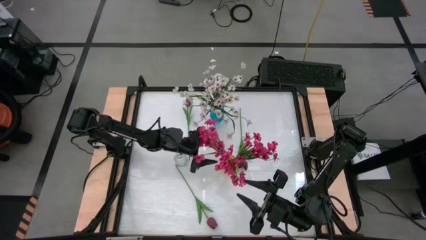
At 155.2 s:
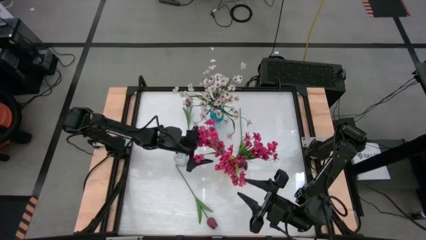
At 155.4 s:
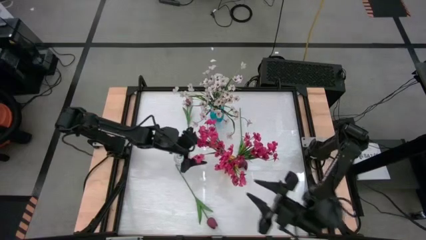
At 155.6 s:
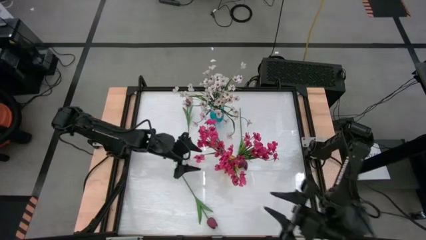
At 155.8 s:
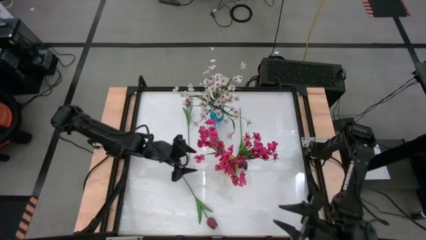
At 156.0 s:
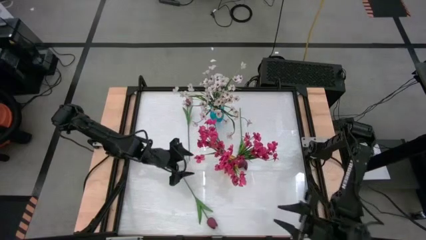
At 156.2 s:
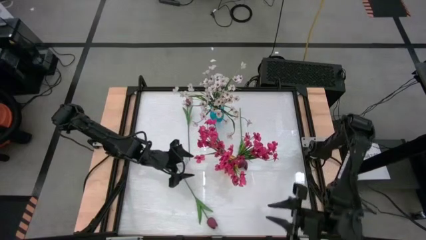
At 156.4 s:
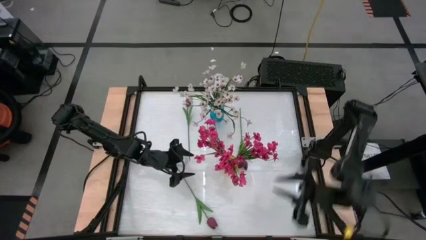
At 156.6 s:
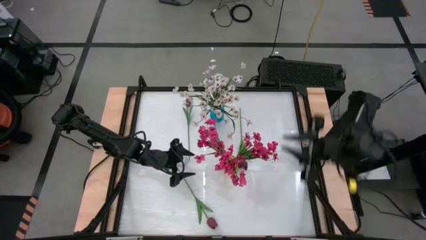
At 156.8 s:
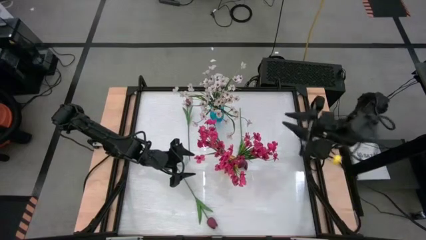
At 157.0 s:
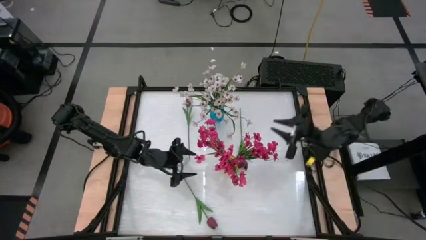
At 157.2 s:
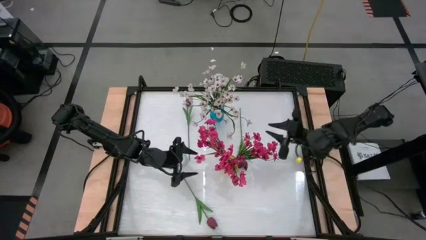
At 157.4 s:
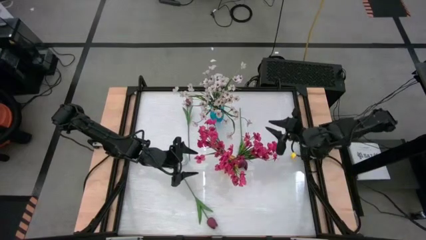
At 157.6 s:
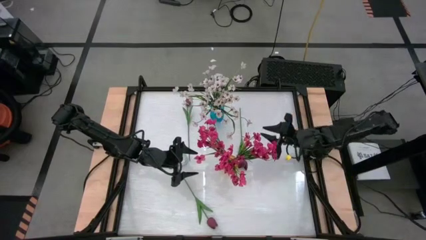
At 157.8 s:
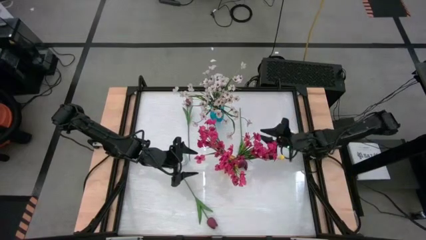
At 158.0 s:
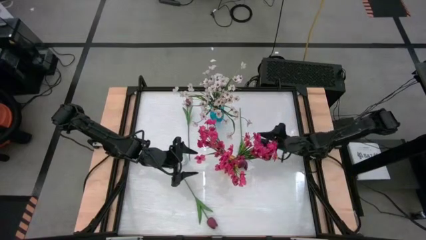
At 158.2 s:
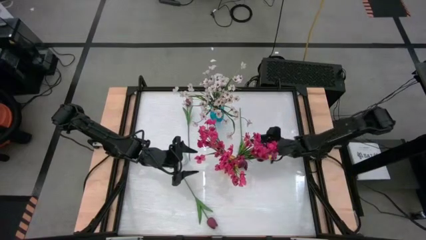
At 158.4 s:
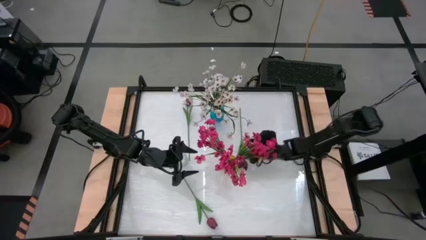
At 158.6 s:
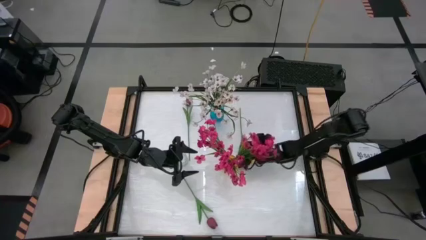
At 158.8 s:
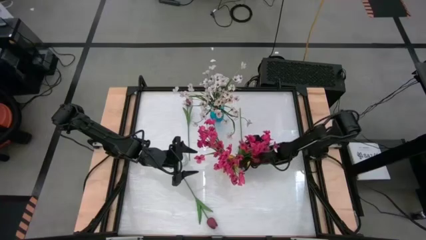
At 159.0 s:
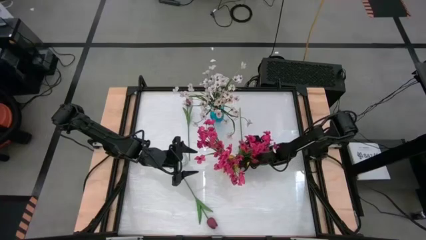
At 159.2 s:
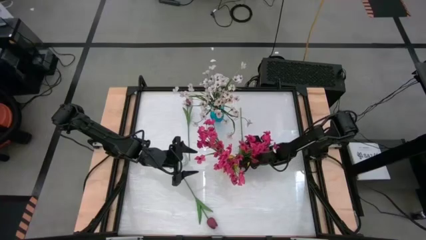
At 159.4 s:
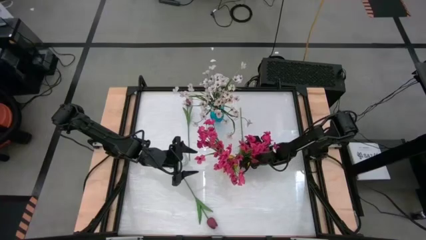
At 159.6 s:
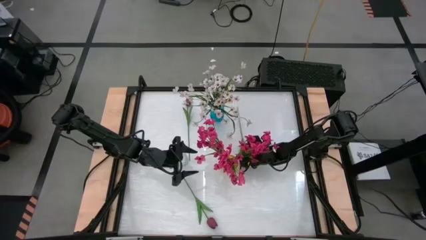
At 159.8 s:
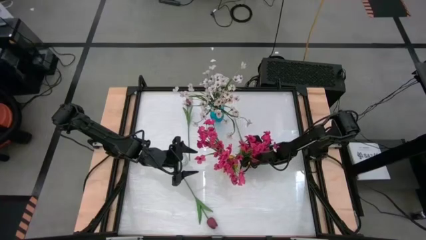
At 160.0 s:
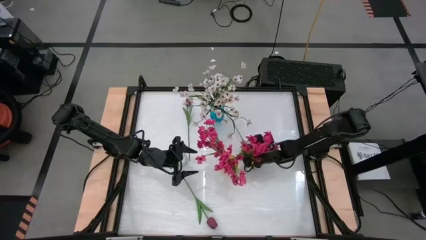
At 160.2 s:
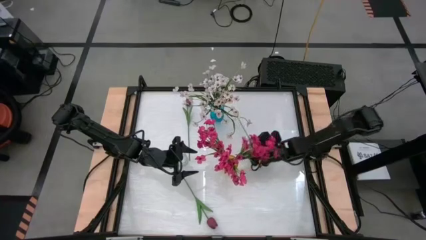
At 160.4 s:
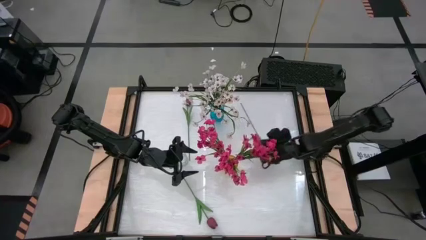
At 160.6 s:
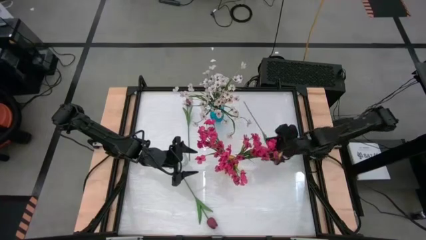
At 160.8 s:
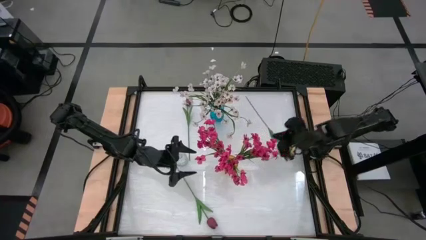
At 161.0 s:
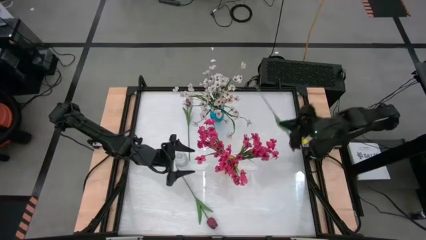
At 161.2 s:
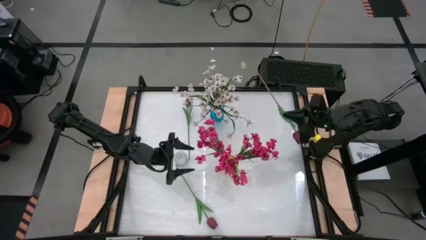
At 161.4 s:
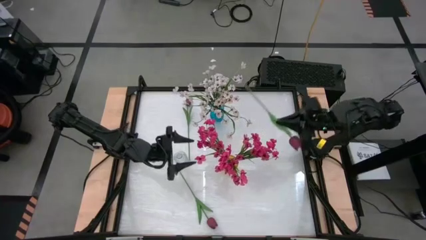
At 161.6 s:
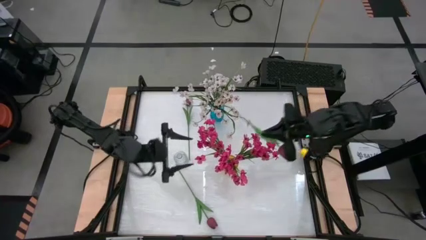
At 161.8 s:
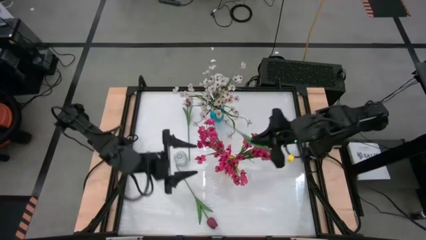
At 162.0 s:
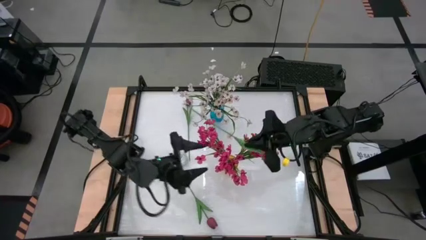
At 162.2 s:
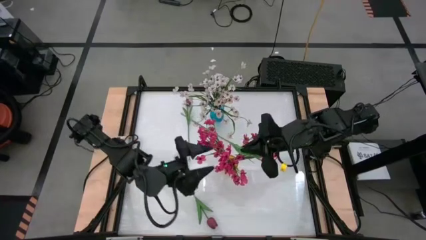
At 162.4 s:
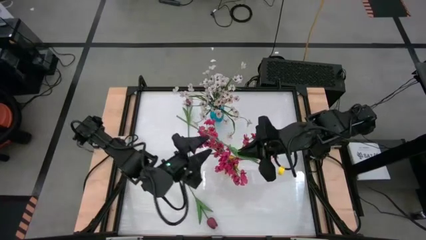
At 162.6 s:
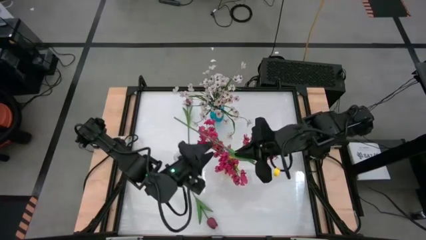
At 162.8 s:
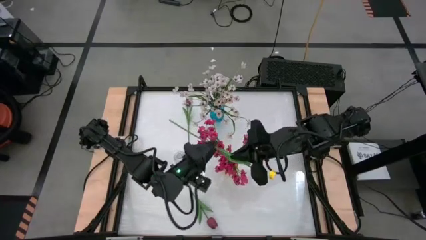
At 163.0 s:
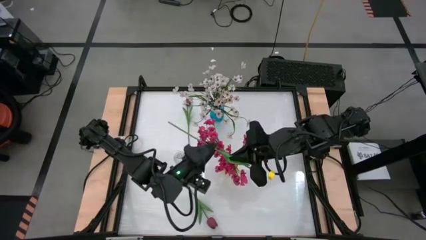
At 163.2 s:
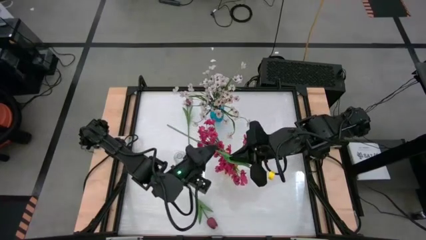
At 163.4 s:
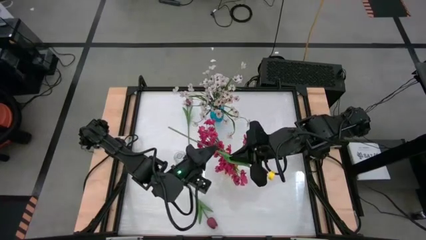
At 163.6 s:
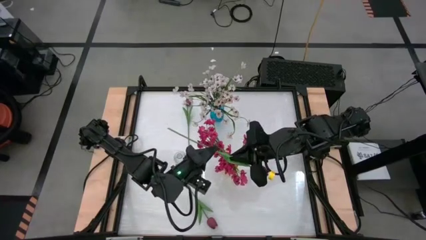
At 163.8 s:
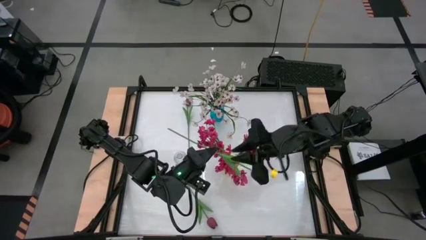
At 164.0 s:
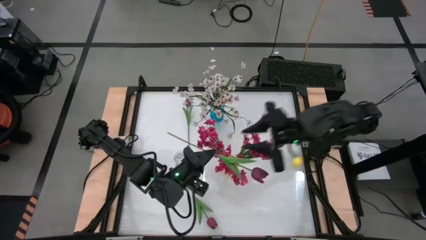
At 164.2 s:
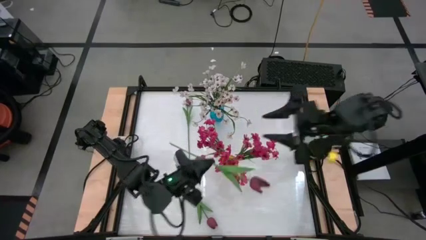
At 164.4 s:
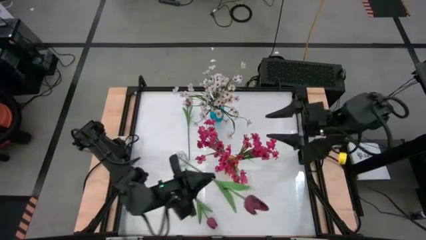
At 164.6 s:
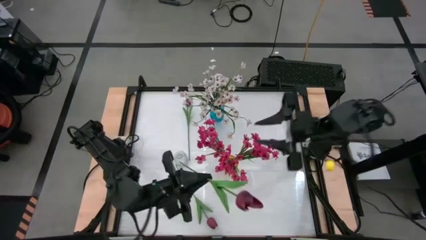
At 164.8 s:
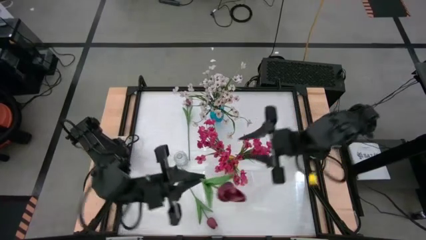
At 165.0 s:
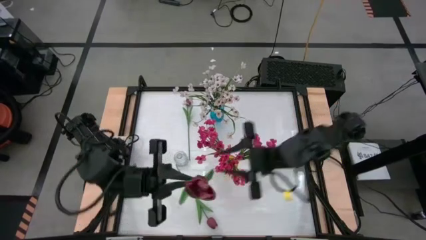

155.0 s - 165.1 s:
Task: Sort flowers into vase by color
Put the right red flower into the transparent vase
